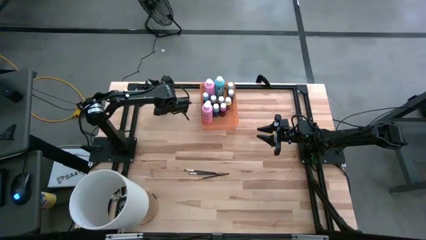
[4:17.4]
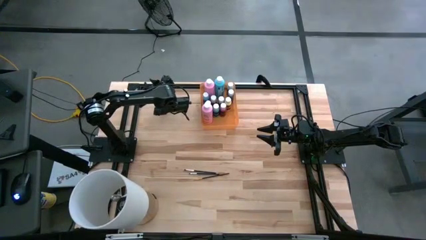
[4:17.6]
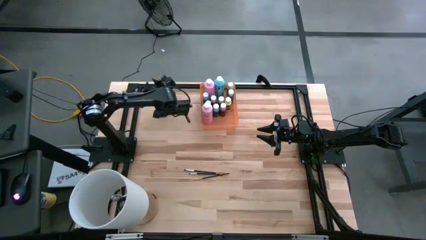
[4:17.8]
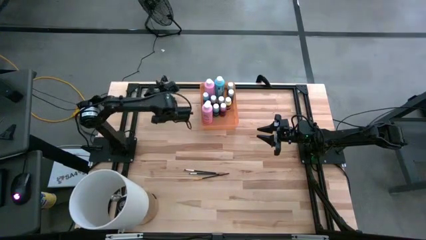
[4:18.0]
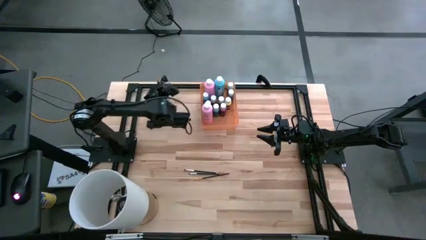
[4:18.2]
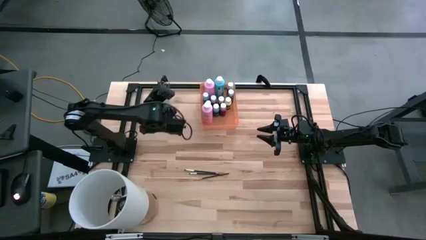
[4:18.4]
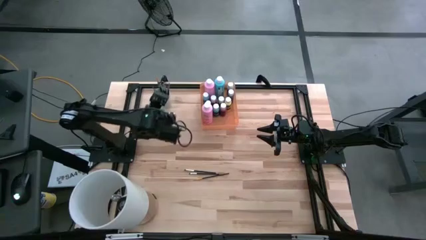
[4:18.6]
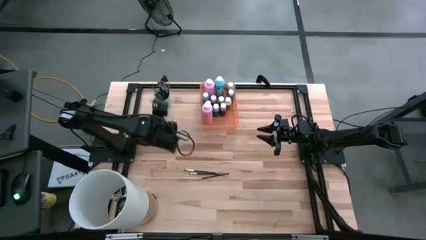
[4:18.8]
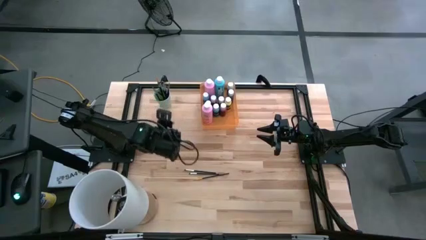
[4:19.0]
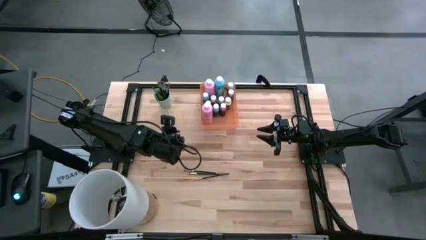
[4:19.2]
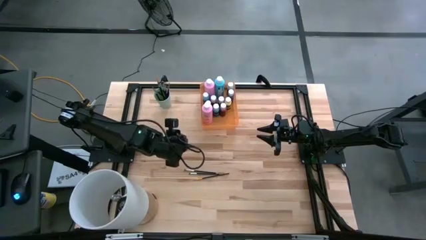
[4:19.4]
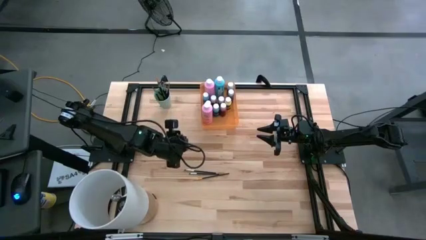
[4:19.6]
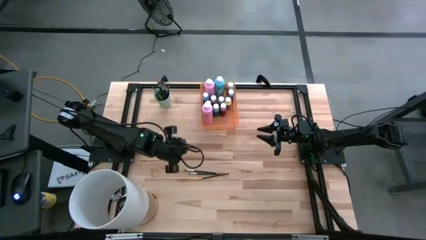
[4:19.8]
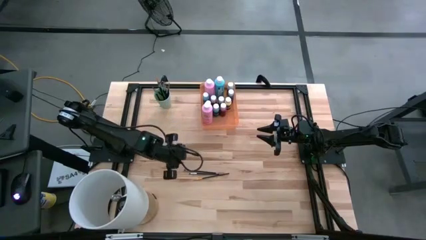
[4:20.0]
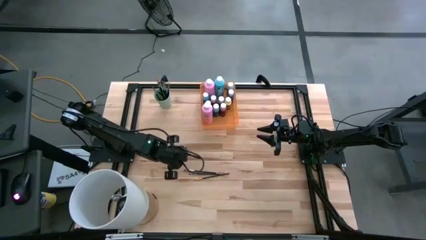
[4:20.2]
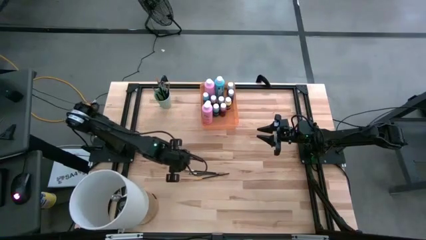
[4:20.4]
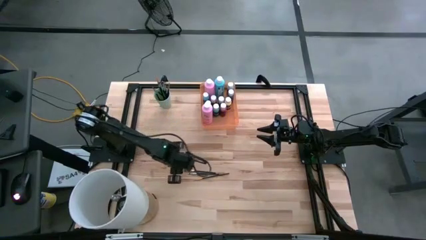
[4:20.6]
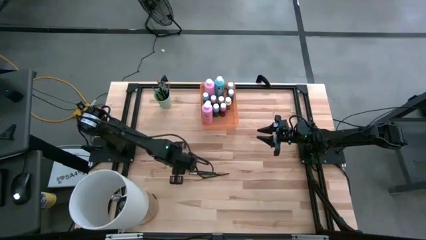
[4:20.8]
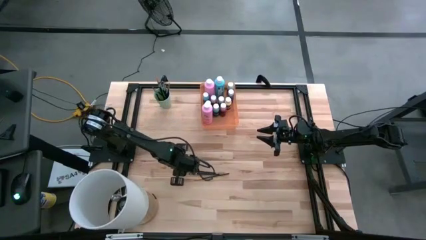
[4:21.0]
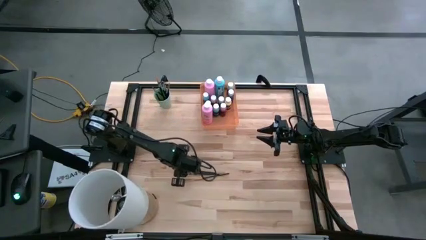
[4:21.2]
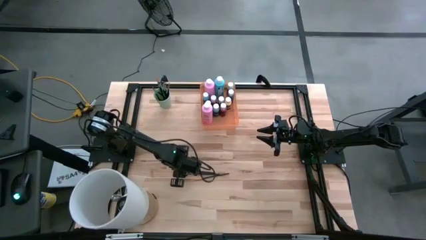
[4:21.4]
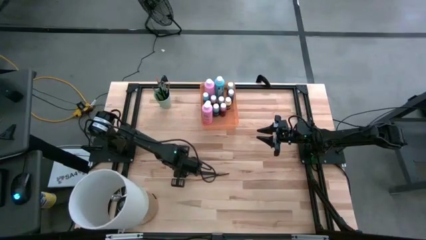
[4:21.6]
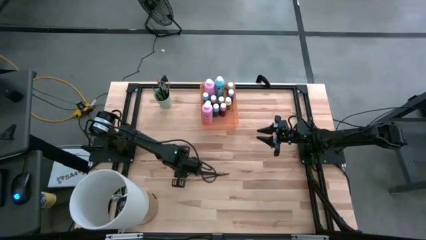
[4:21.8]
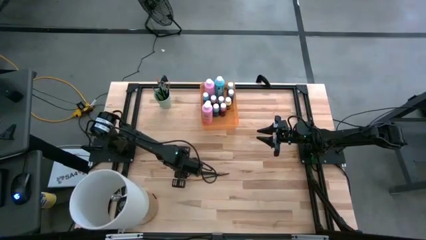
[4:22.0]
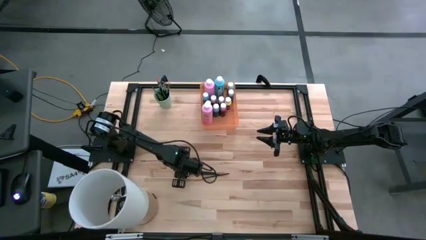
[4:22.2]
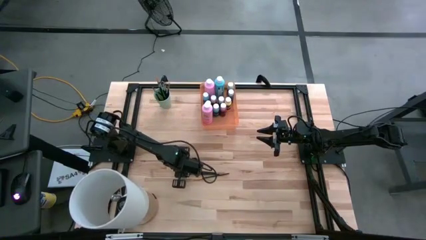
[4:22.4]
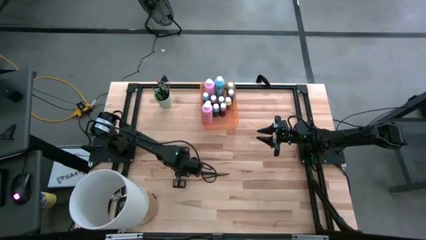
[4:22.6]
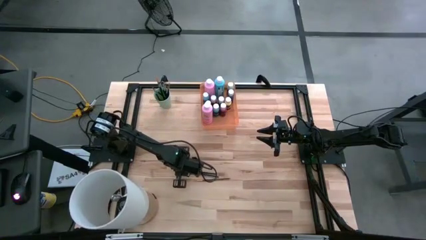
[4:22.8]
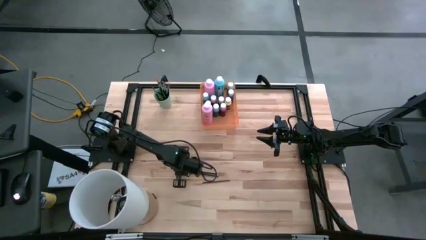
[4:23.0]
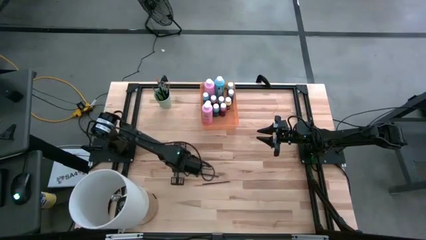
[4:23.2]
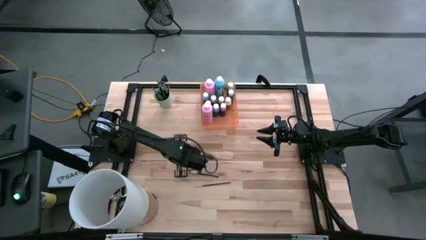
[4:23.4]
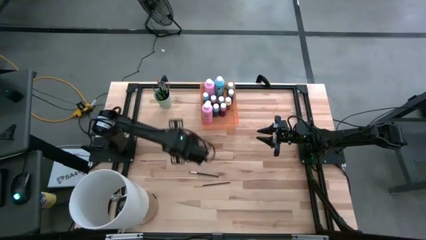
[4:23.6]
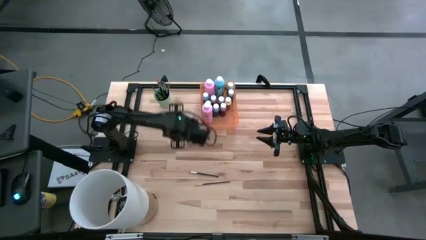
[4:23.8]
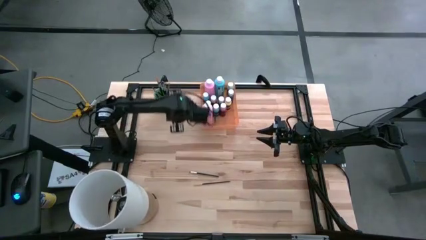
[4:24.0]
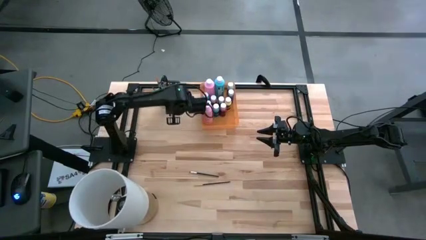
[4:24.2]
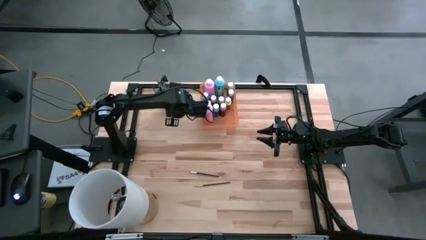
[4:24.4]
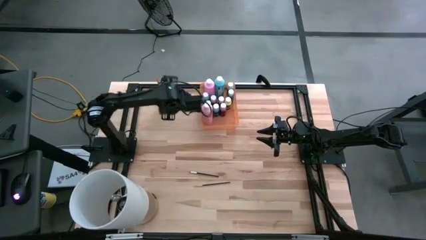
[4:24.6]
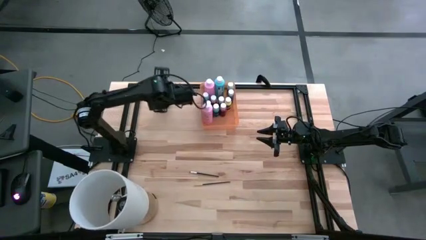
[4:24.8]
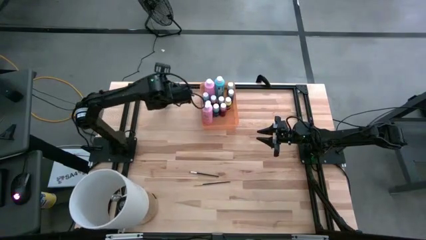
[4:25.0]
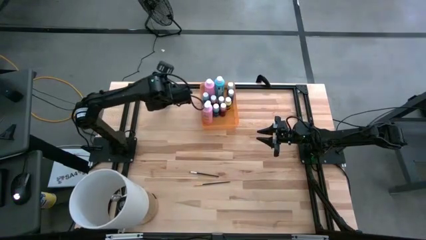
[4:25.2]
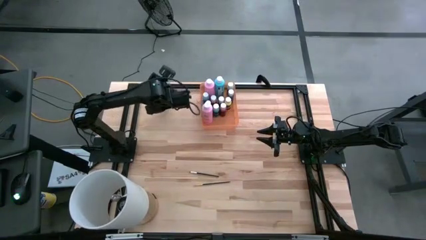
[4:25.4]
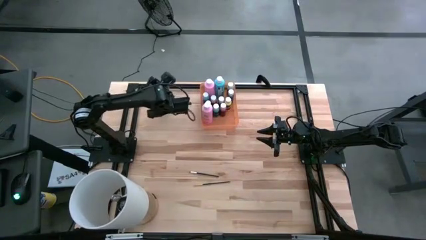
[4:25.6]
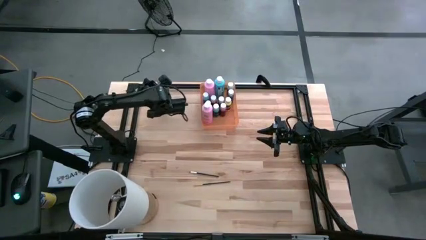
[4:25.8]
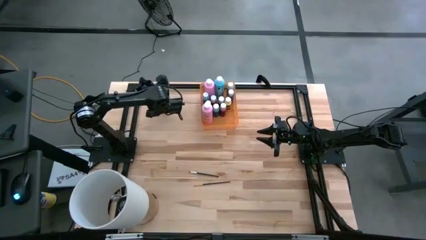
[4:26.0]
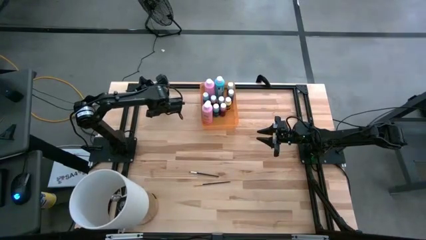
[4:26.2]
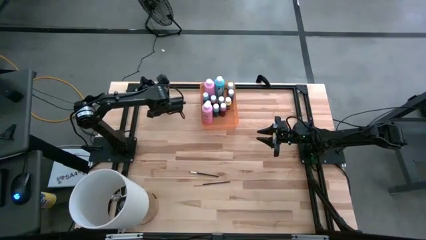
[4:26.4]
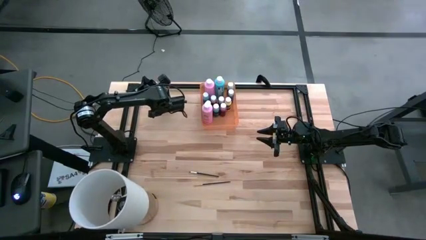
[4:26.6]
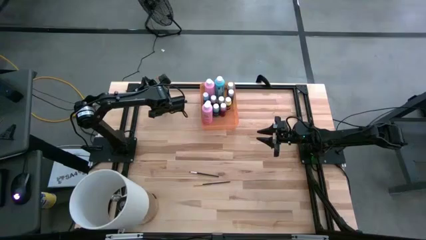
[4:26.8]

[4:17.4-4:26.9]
Task: Pick & Place Paint Supplies
Put the white paintbrush into the cup

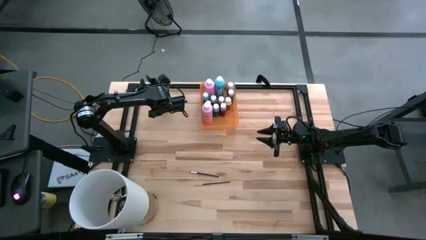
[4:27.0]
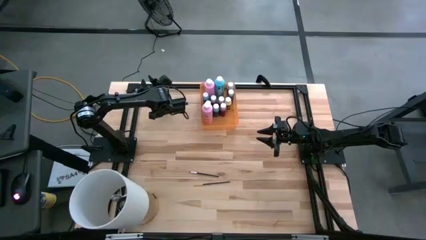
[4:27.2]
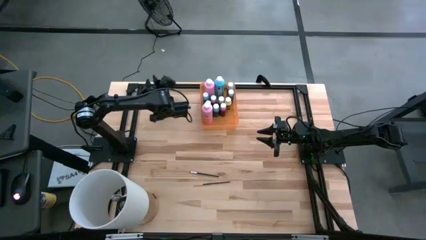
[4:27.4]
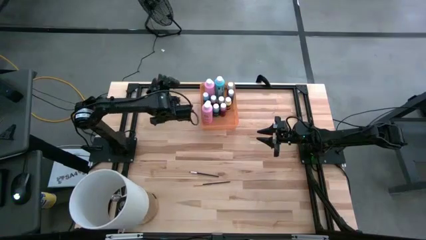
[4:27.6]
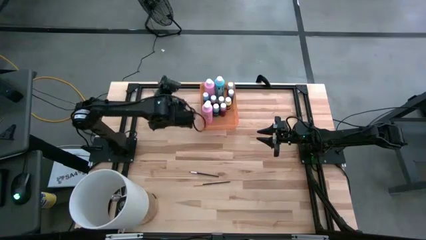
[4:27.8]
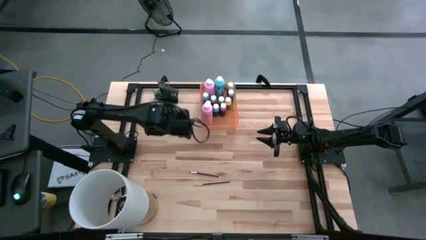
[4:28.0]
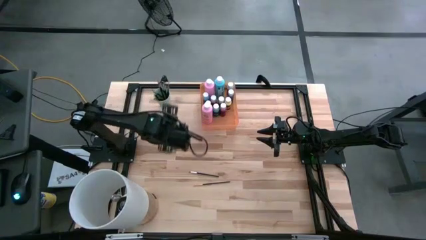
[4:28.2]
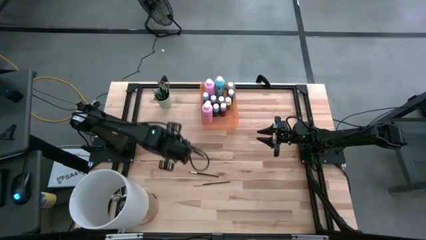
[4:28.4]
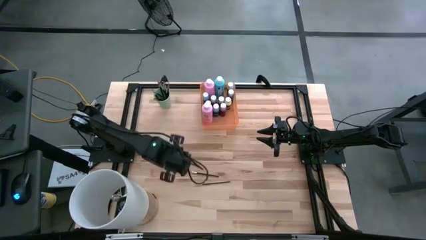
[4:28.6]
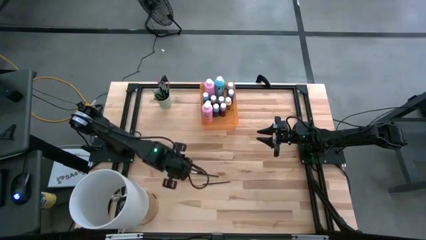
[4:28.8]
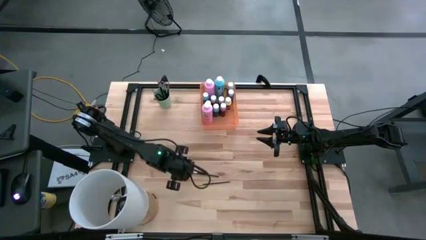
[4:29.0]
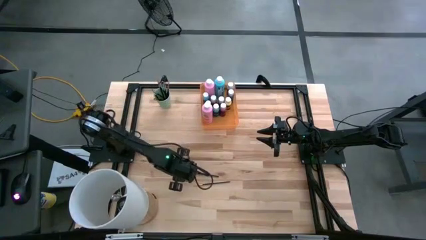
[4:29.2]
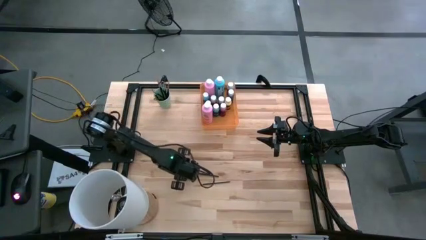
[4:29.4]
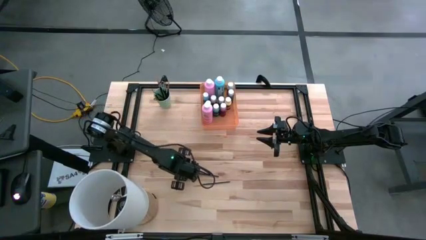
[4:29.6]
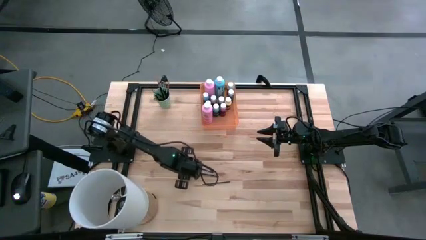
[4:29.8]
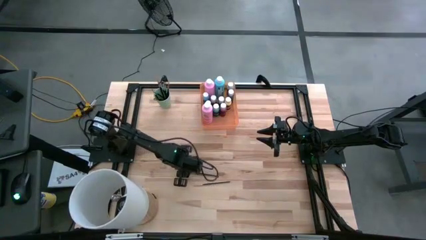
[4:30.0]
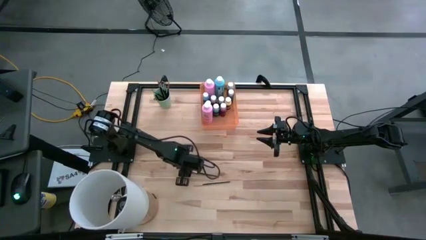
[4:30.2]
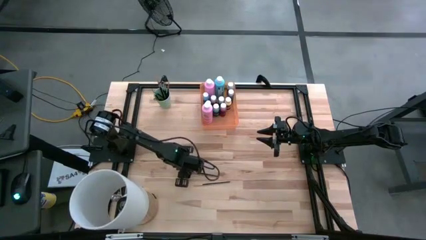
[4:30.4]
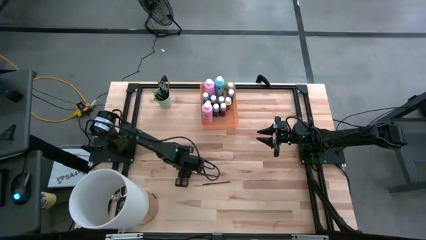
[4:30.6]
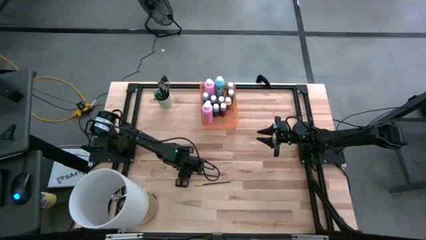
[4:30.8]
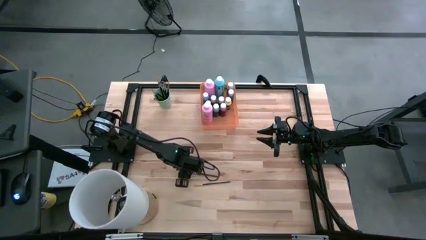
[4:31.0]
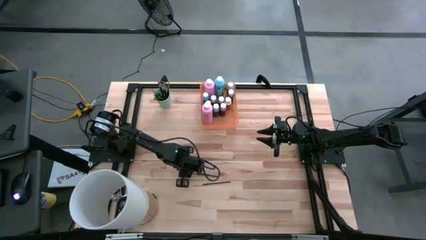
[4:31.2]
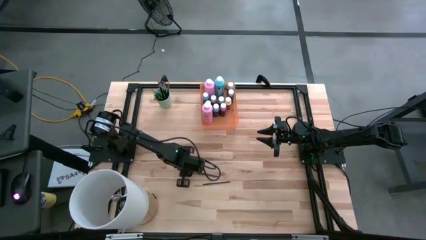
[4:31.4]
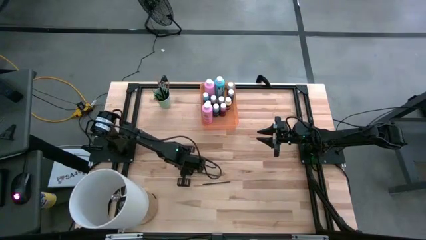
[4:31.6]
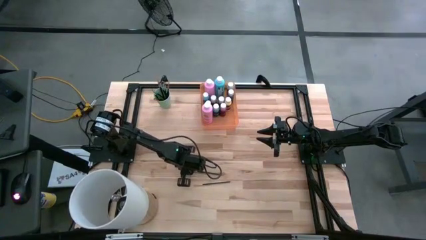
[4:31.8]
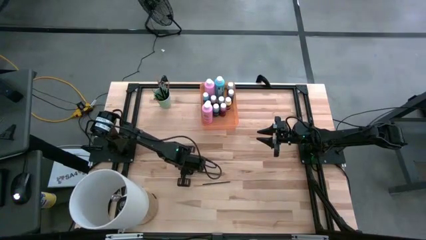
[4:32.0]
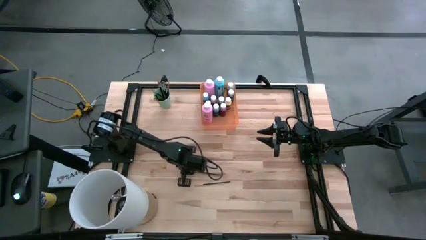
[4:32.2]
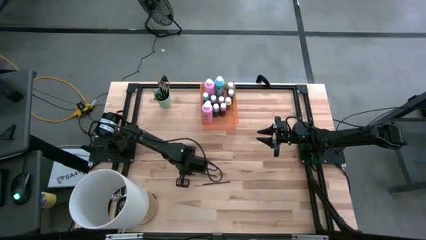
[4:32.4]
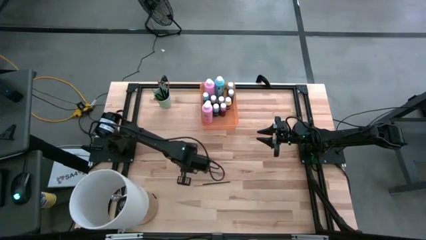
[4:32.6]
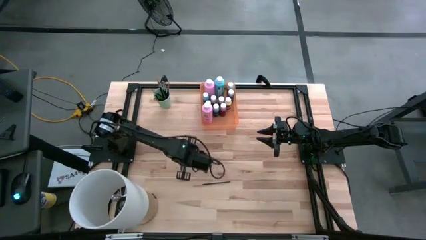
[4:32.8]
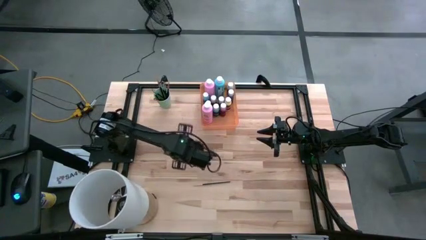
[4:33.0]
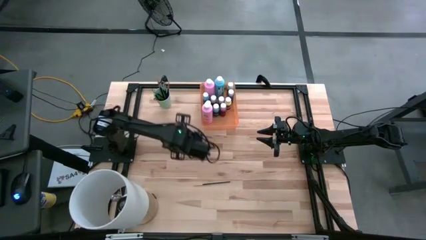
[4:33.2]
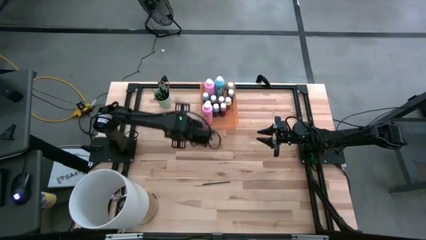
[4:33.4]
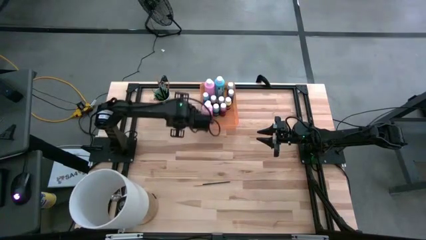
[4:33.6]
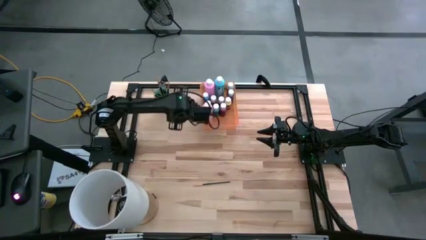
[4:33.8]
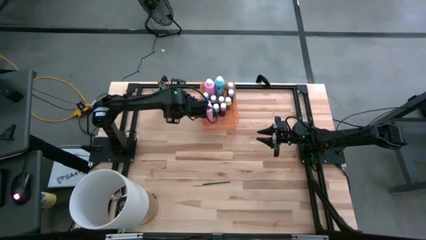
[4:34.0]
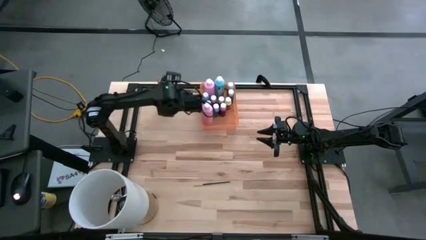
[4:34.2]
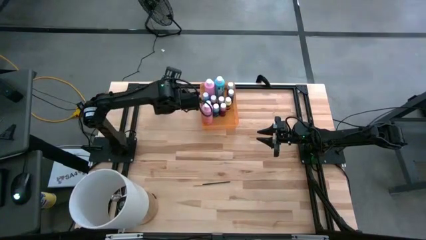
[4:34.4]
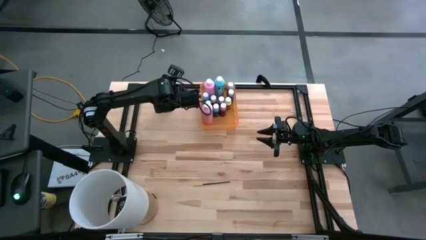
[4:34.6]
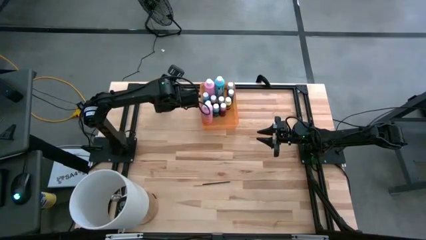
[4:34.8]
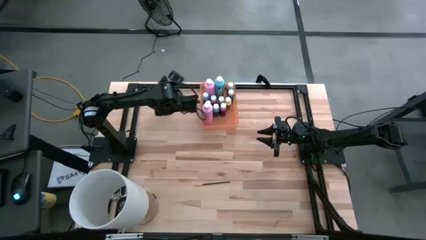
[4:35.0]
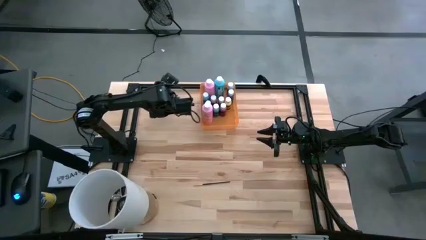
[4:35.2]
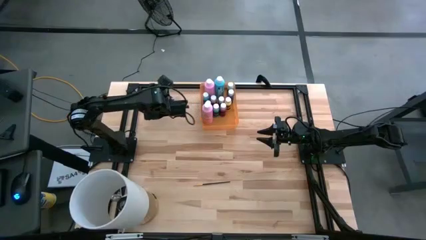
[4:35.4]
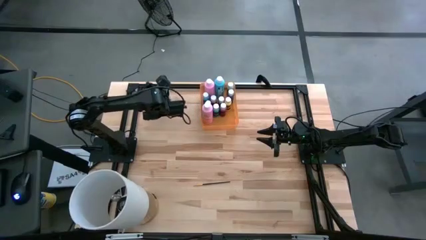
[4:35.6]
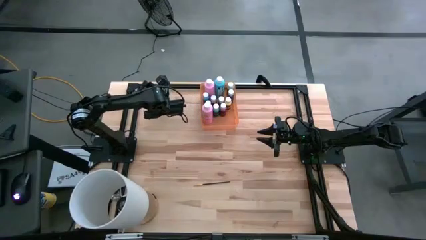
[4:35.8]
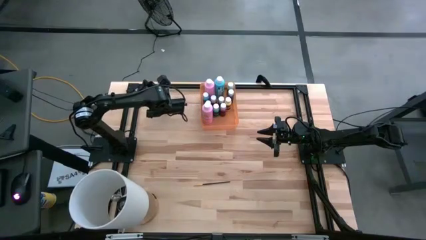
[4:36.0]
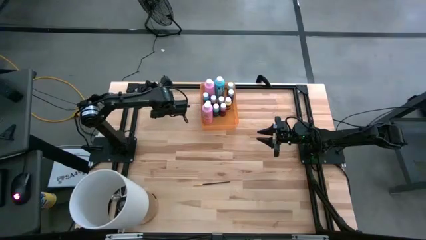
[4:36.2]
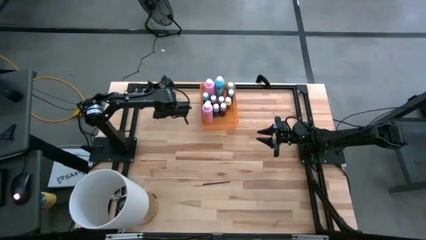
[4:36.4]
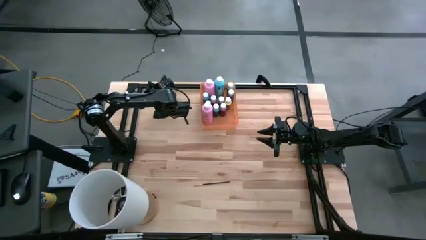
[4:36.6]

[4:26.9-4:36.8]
Put the white paintbrush into the cup
